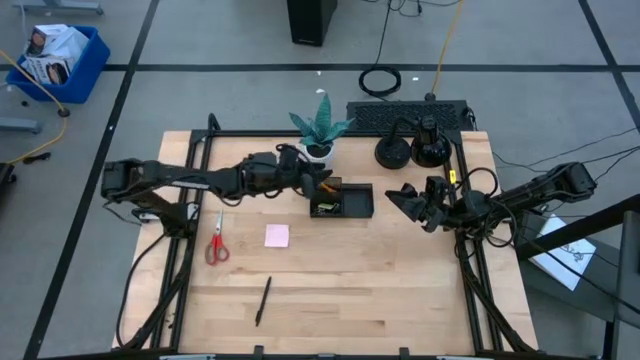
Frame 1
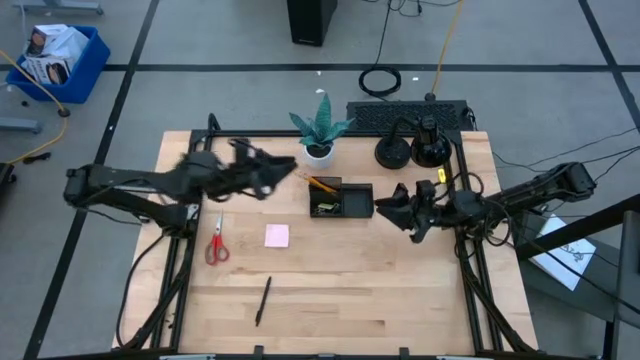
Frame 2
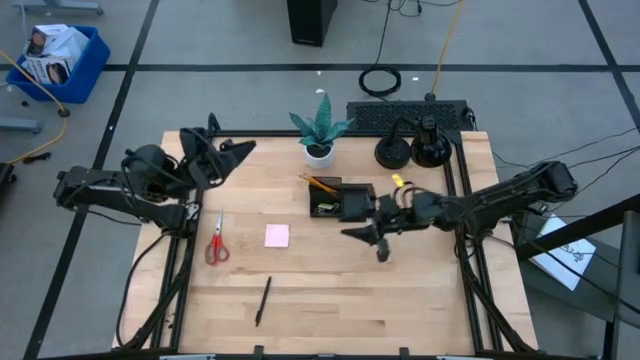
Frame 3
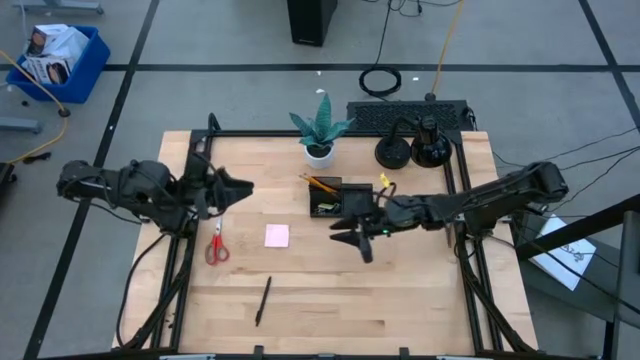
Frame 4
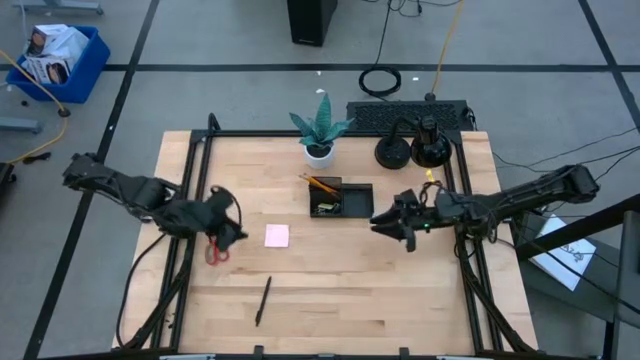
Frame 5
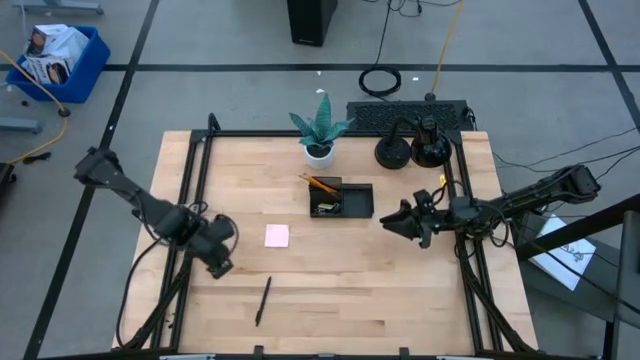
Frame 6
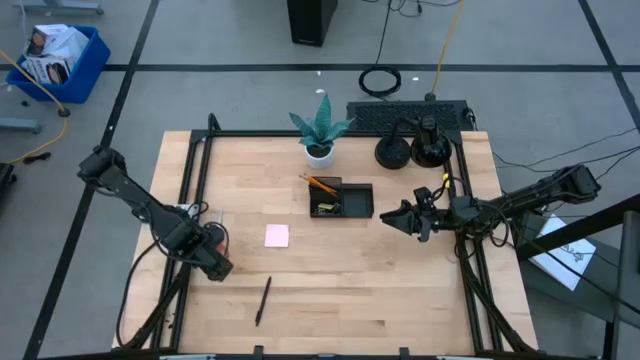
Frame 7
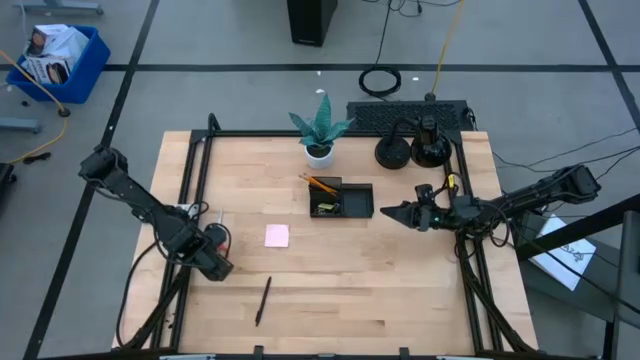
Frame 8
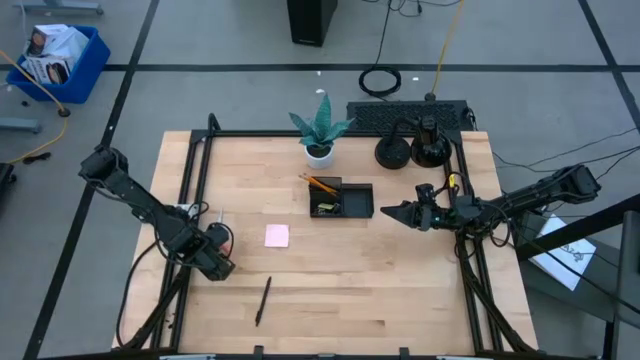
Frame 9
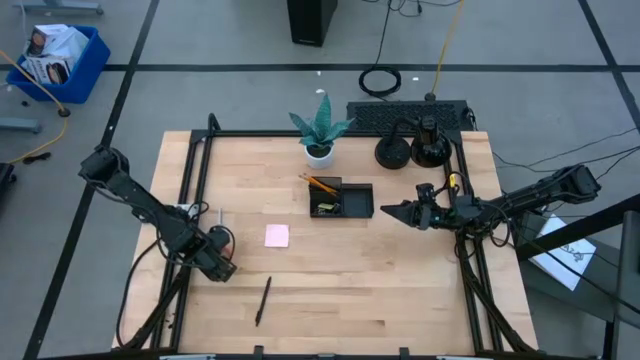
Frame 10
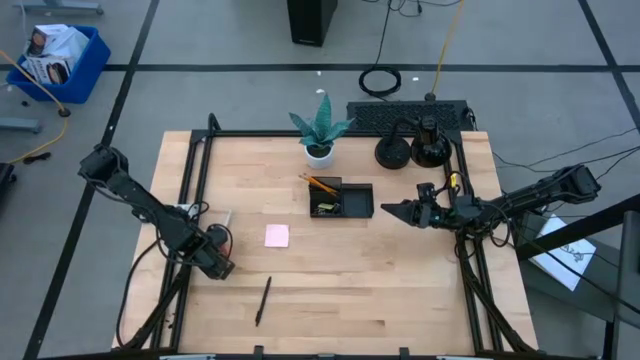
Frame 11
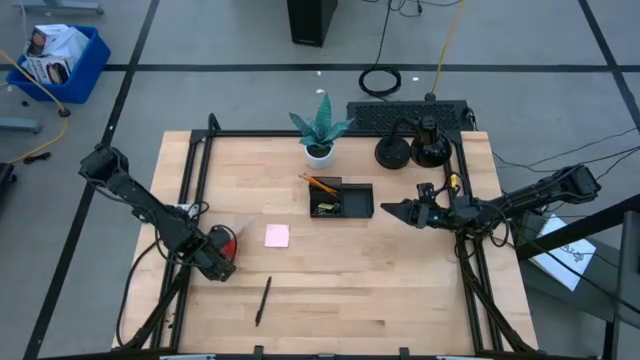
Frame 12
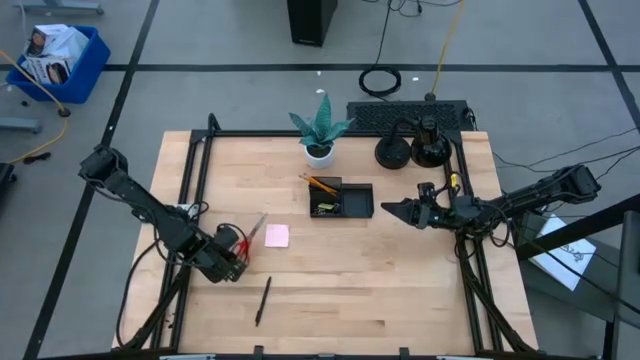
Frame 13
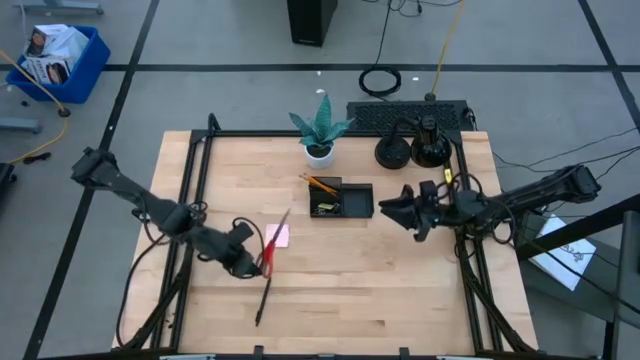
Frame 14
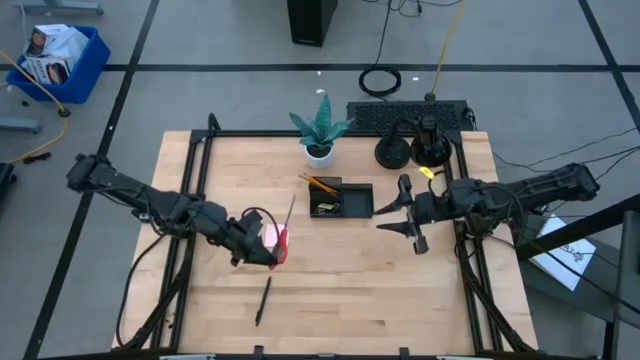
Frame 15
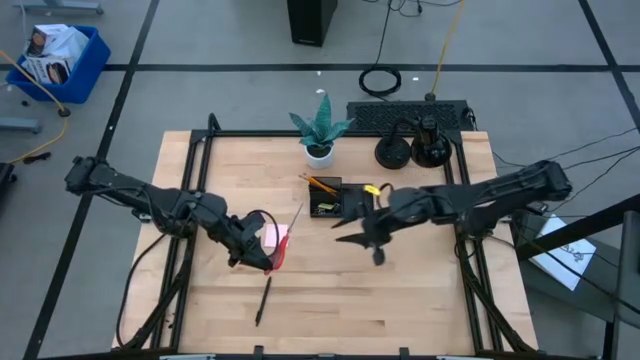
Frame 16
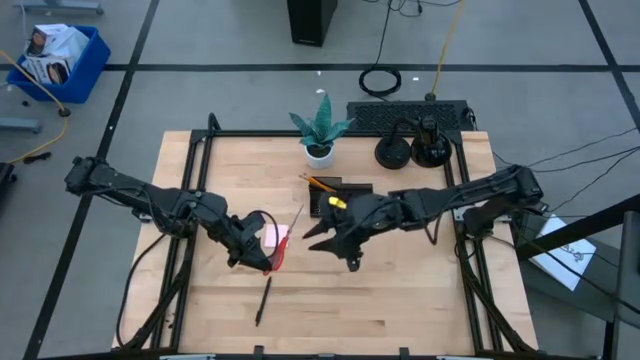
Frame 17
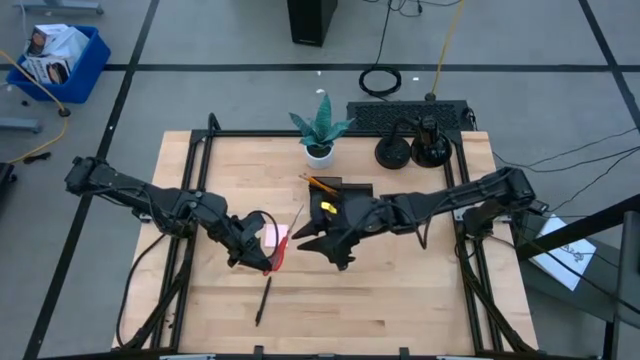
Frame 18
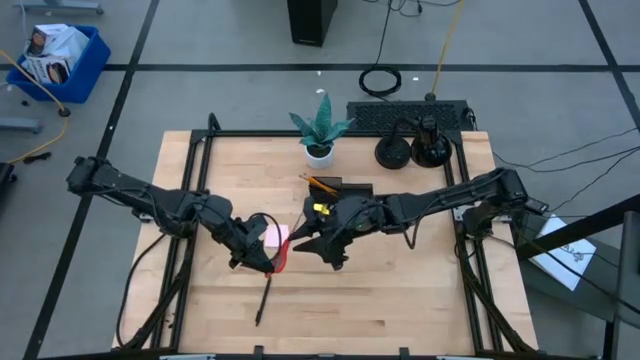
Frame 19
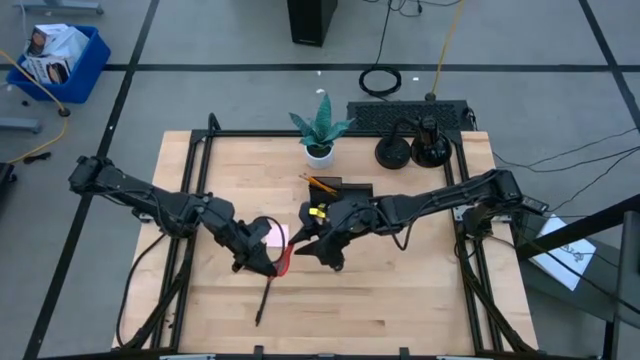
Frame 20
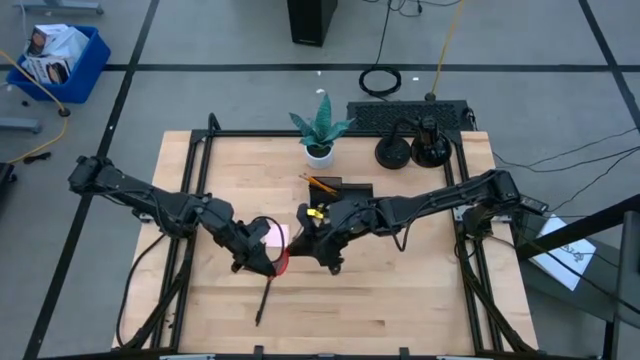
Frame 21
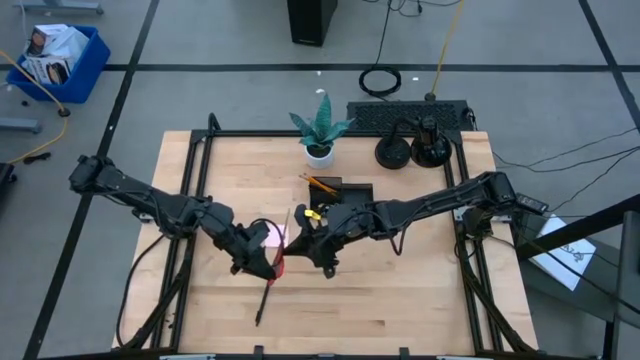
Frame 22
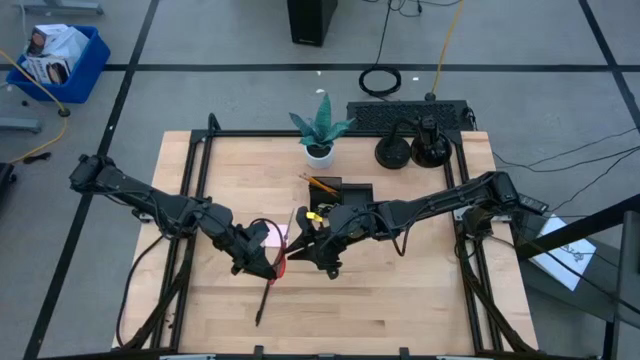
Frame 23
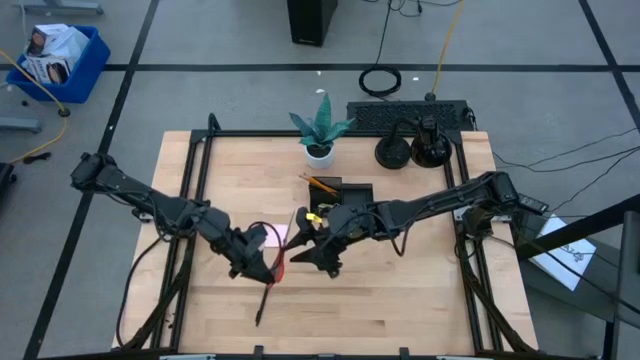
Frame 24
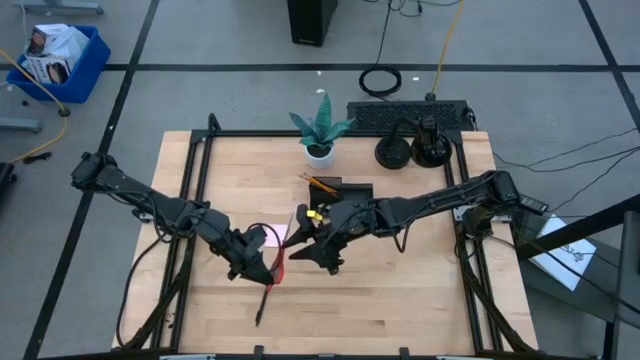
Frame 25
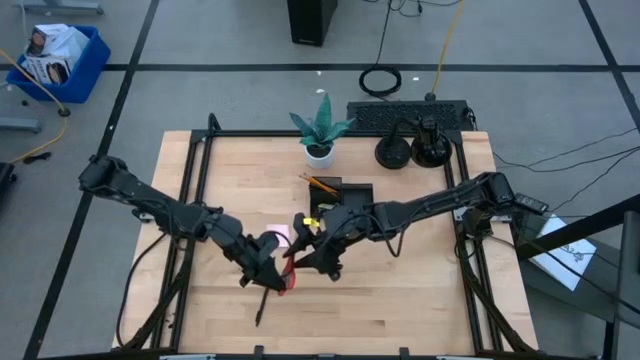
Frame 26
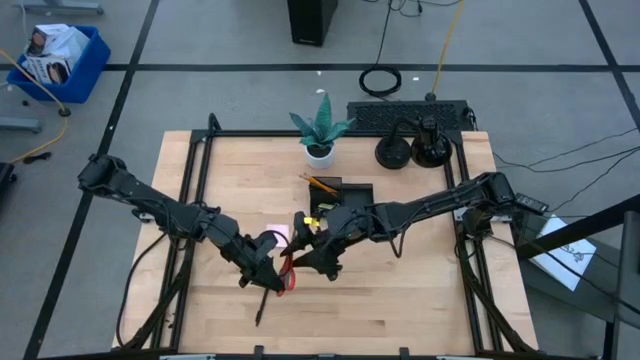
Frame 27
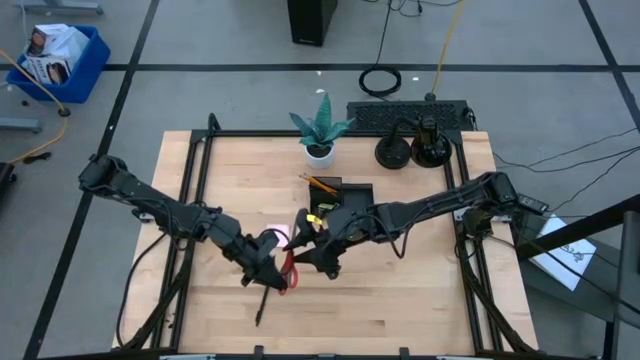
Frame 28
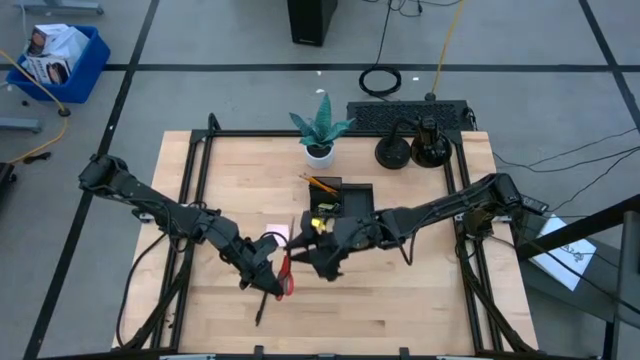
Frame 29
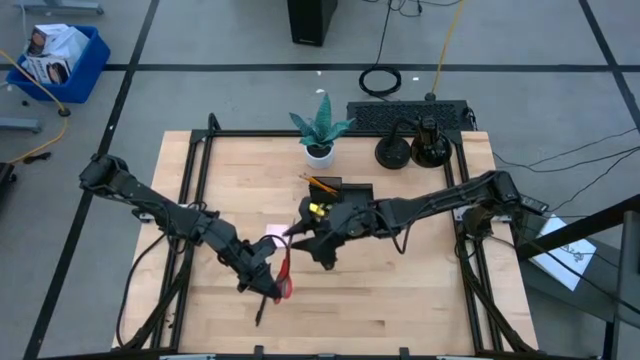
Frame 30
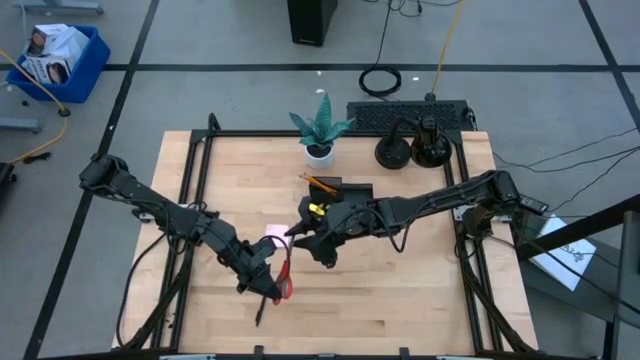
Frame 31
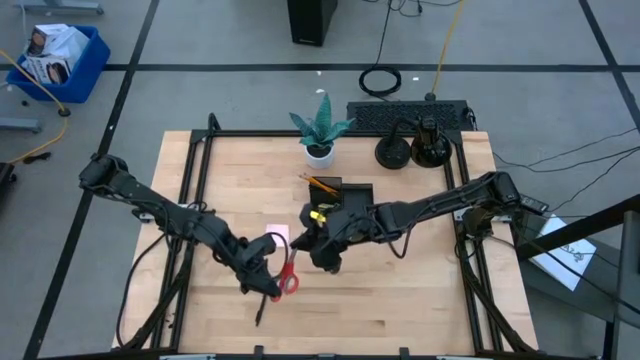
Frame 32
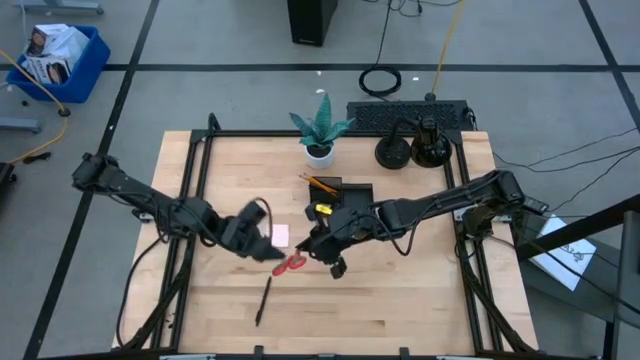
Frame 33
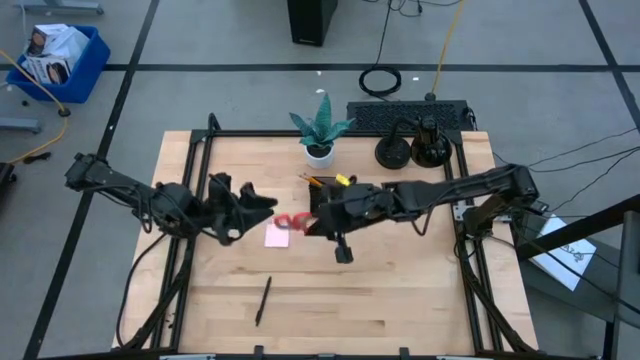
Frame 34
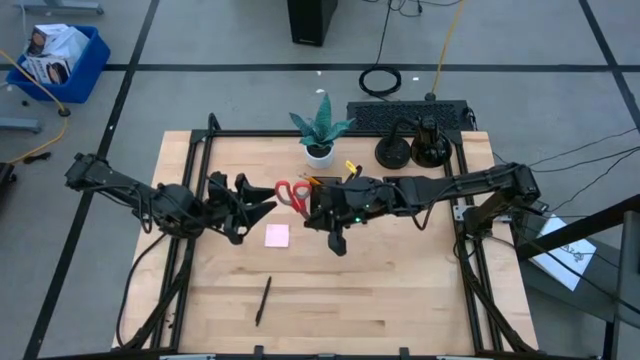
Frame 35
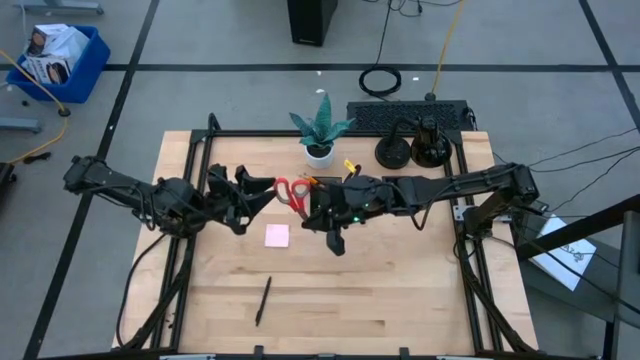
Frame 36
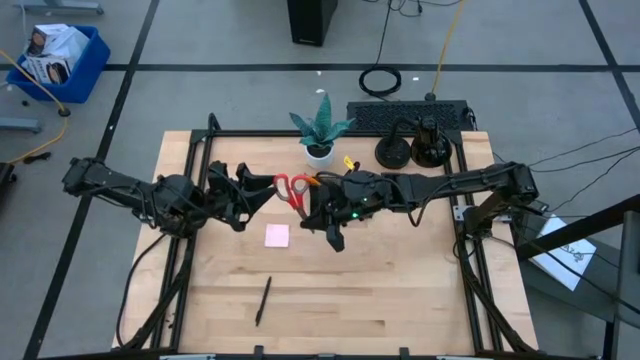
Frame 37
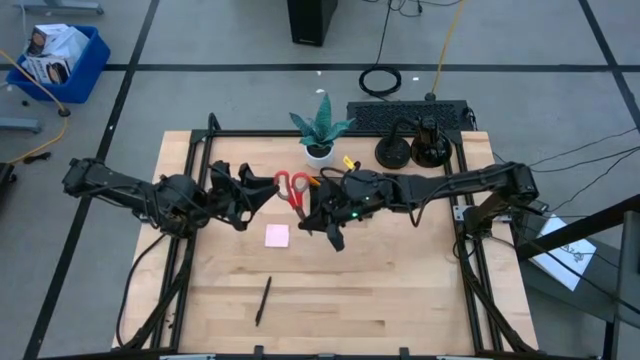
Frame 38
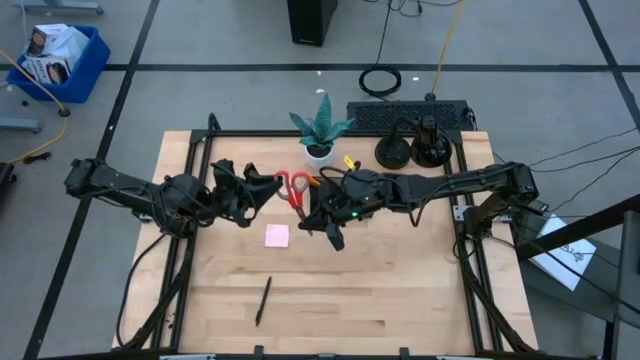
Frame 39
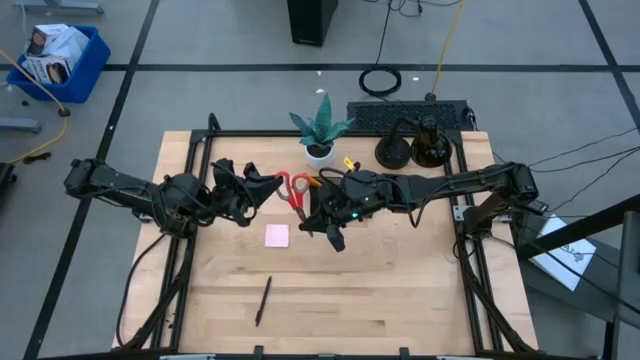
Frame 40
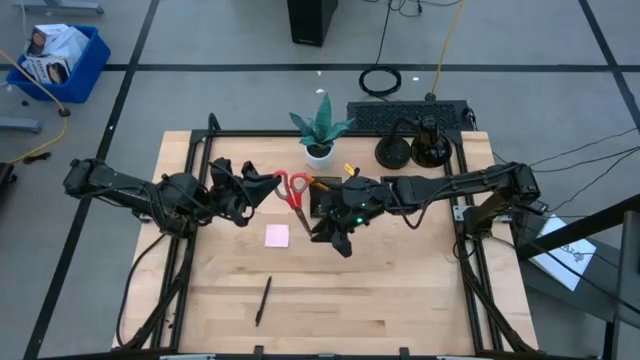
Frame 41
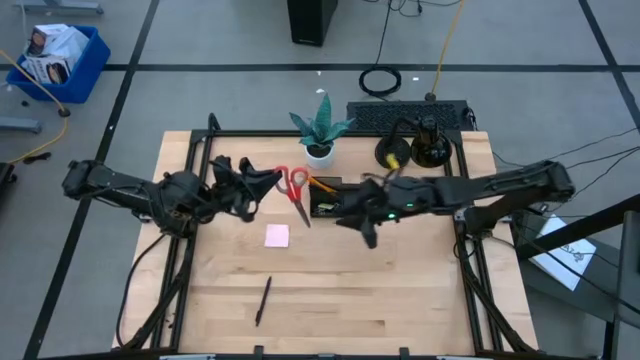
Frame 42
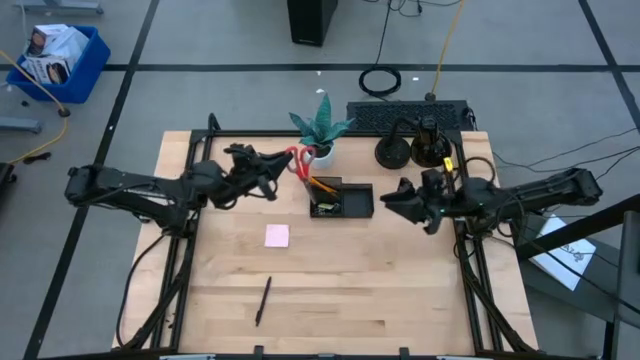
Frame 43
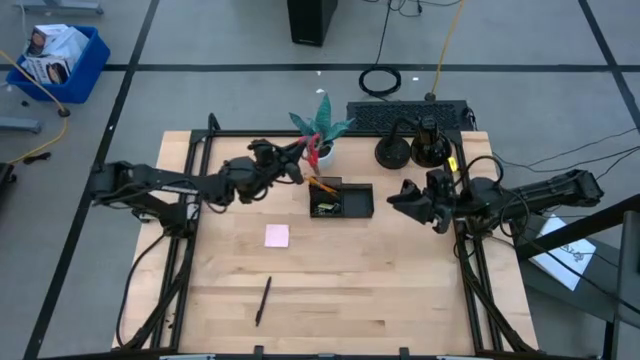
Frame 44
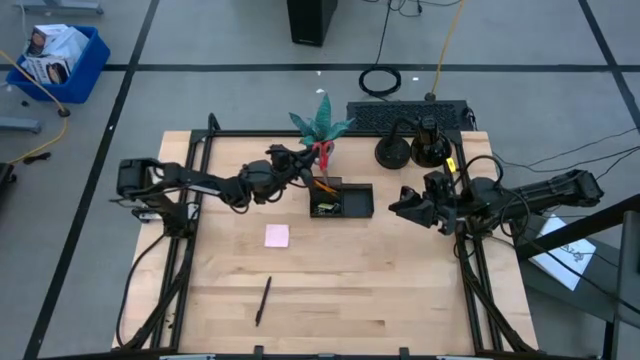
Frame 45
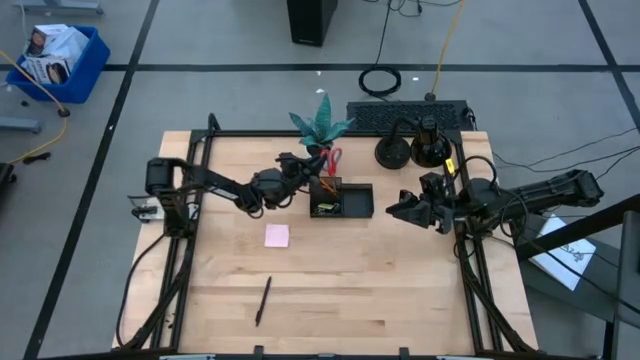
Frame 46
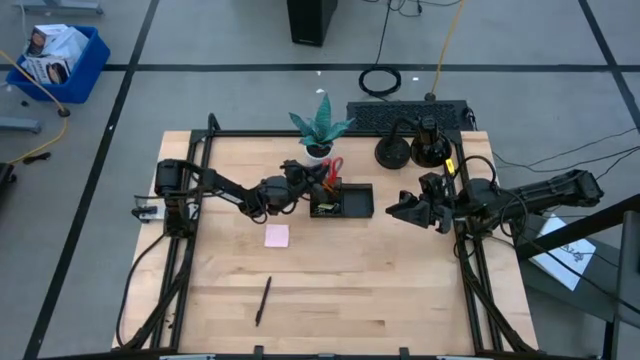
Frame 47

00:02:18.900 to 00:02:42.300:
Task: Pick and place office supplies into organizer
Put the red scissors into the black desk organizer
